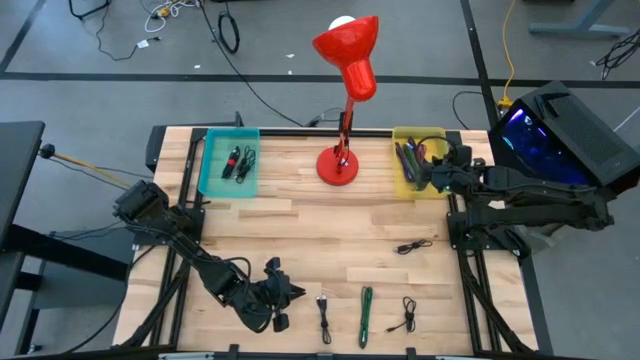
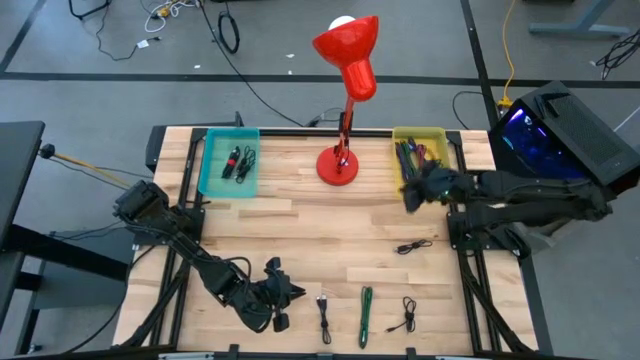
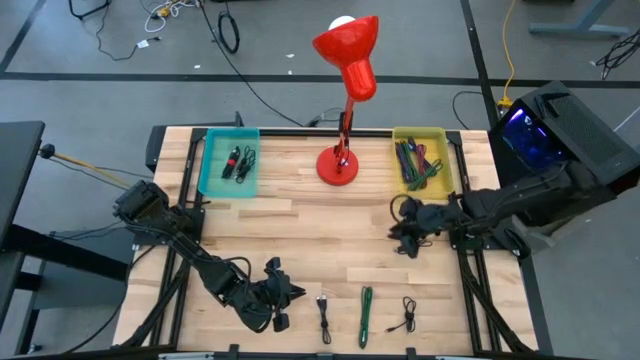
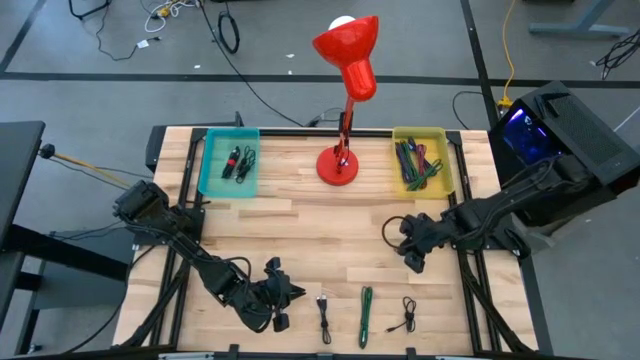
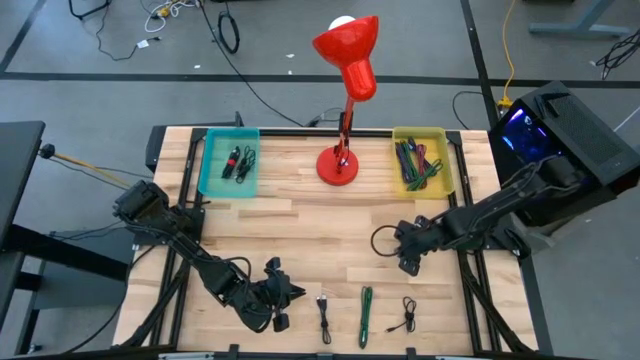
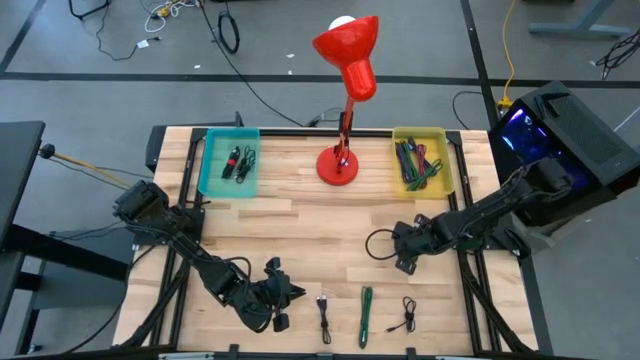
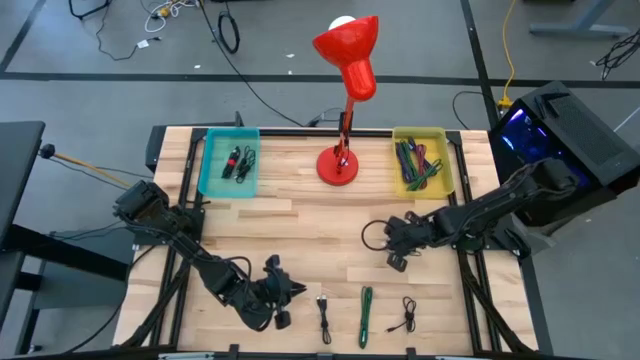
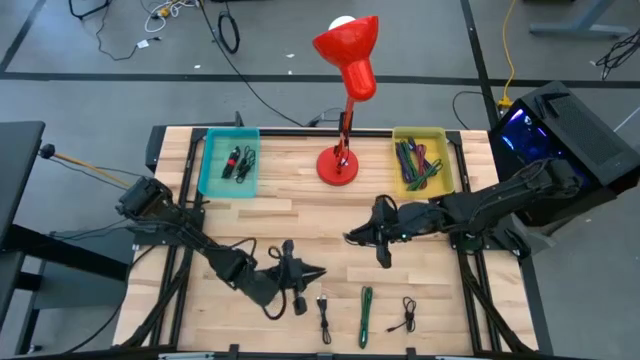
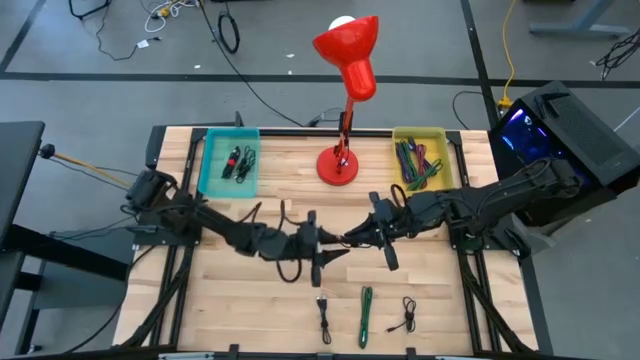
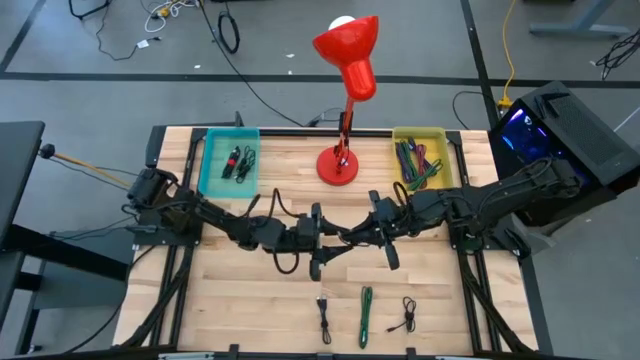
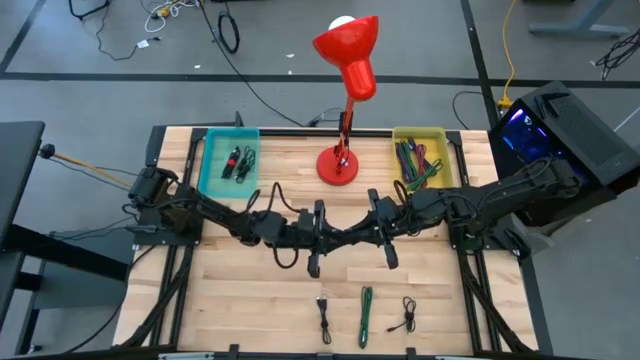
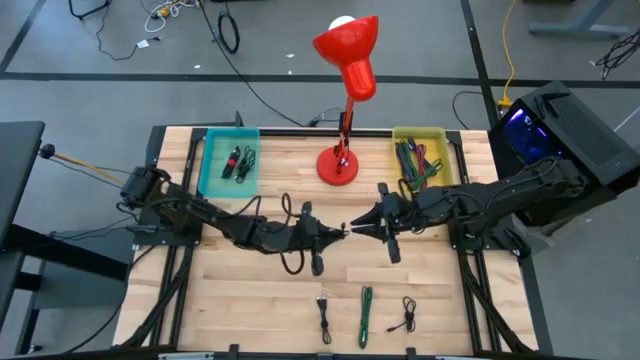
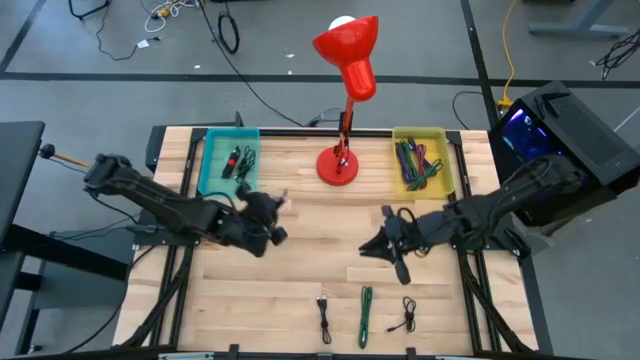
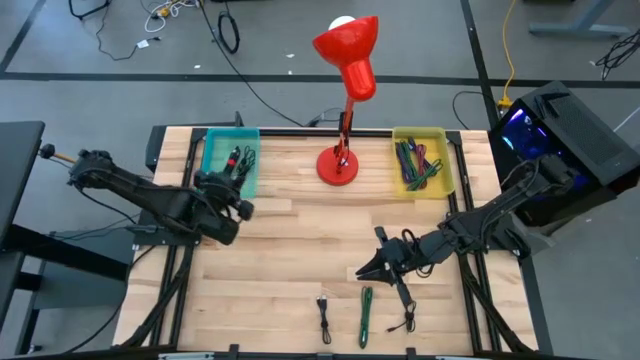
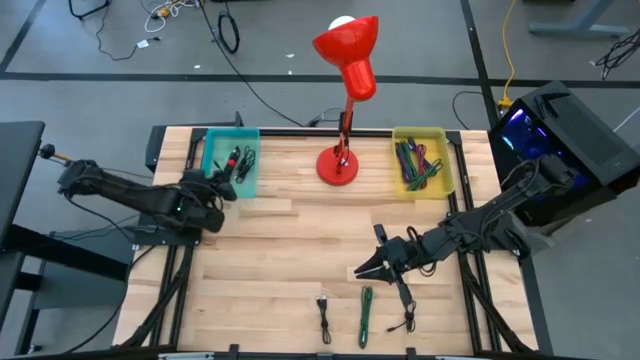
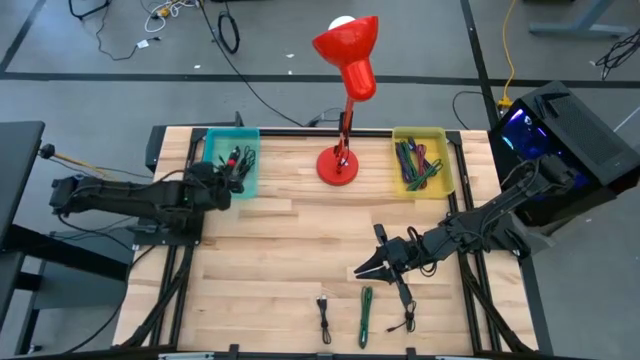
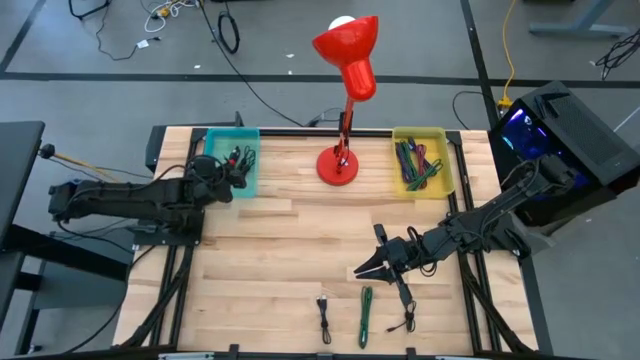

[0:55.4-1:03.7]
Task: Pick & Place USB Port
Put the black USB cable into the green bin

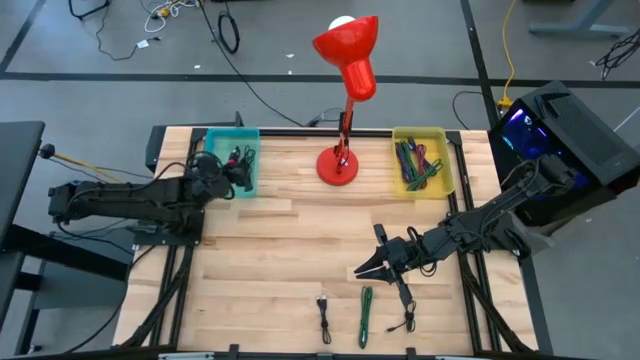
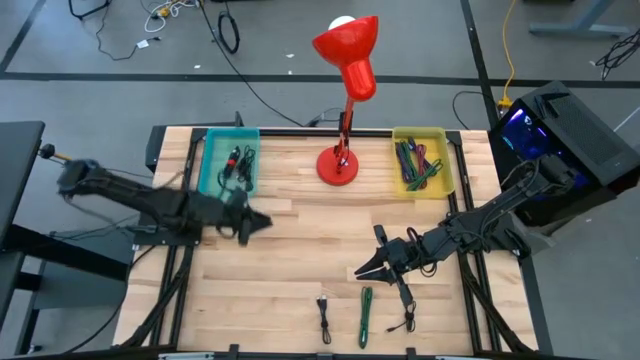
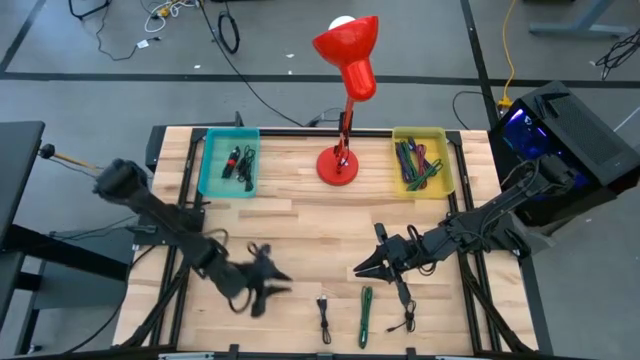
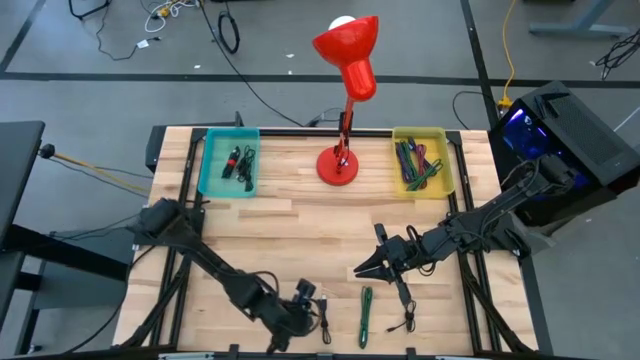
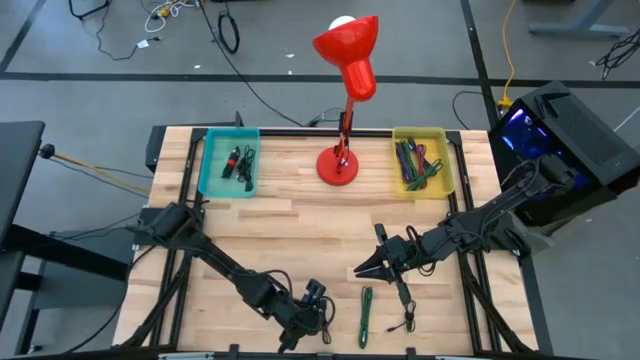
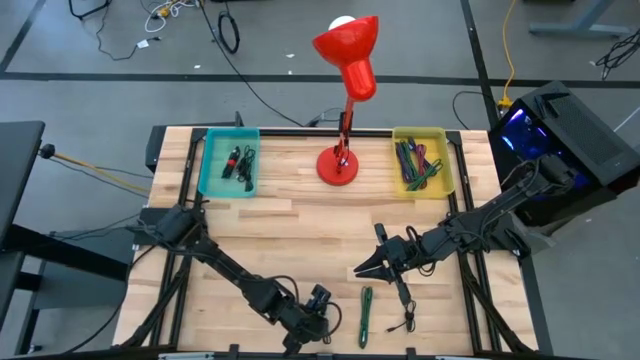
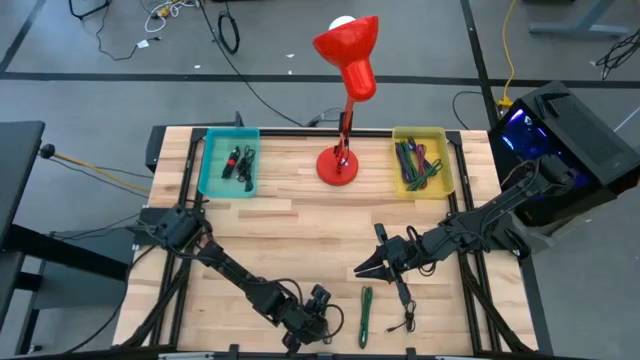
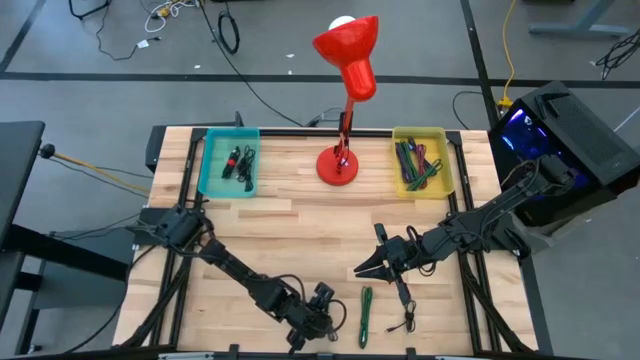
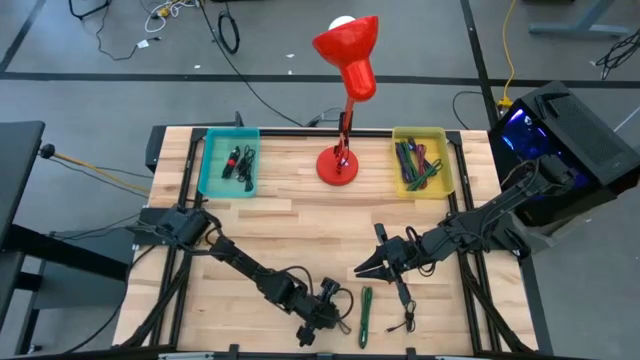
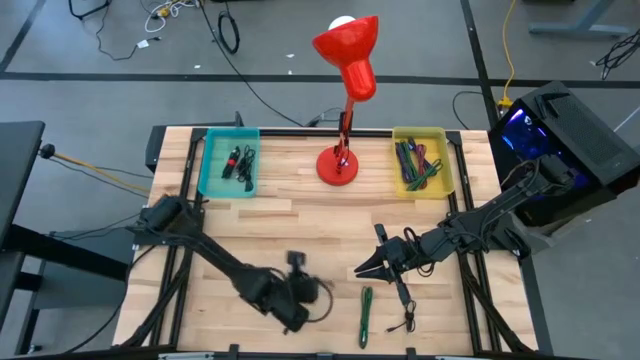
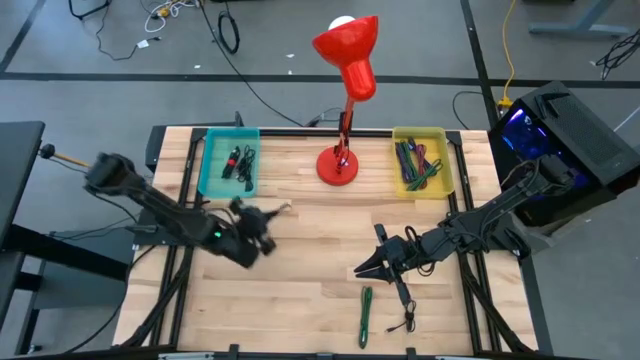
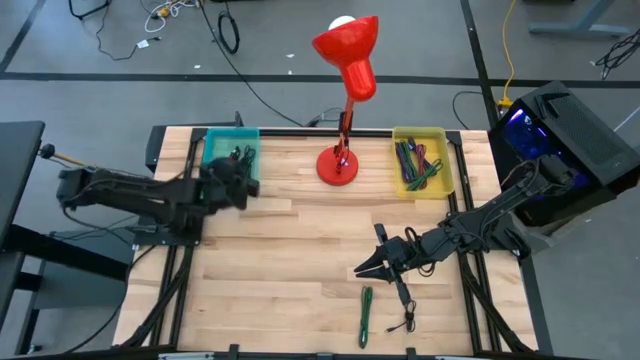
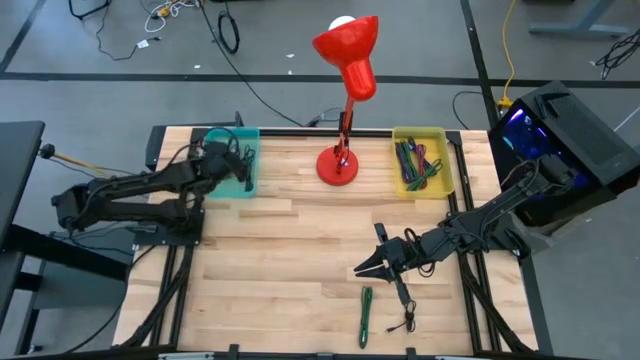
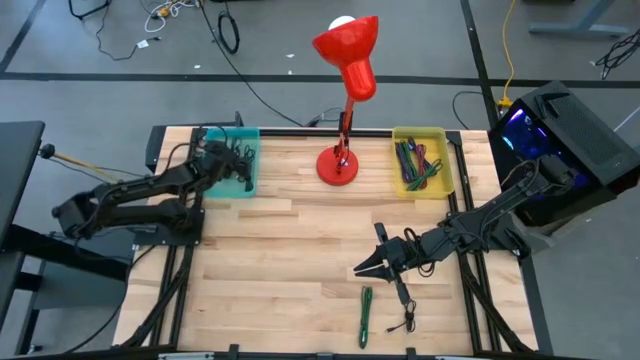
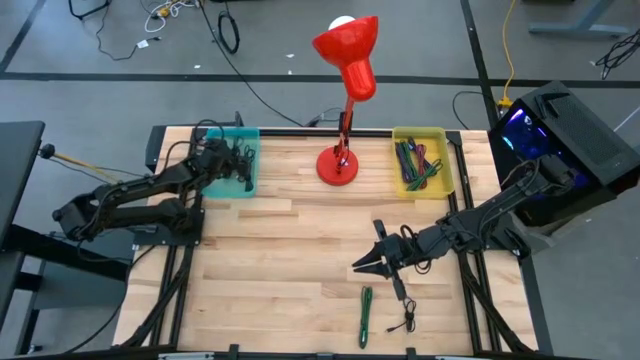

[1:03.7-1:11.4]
Put the black USB cable into the green bin

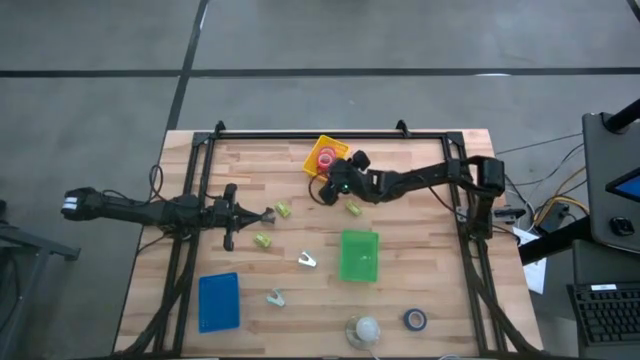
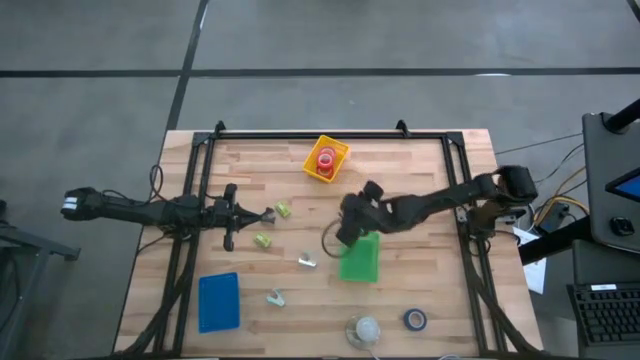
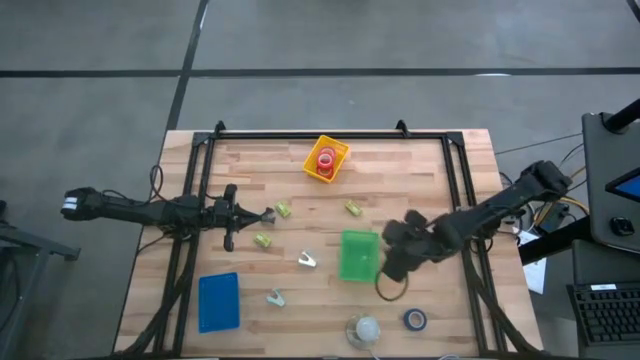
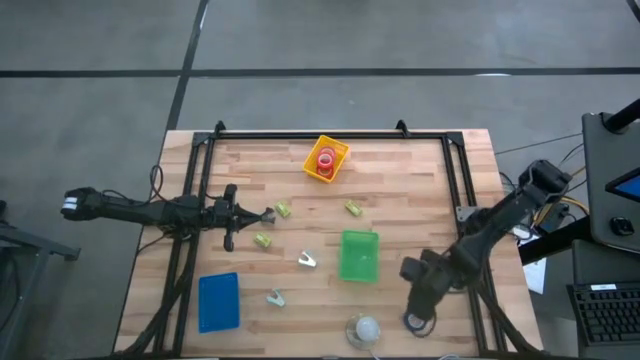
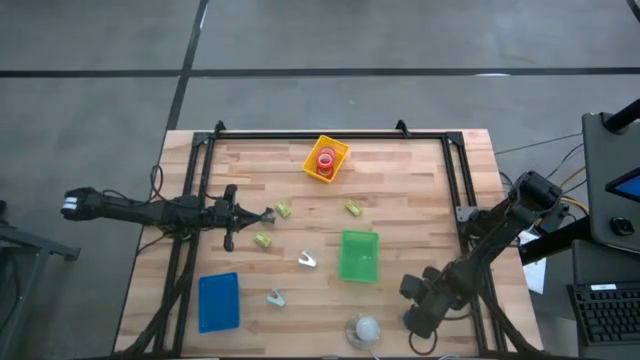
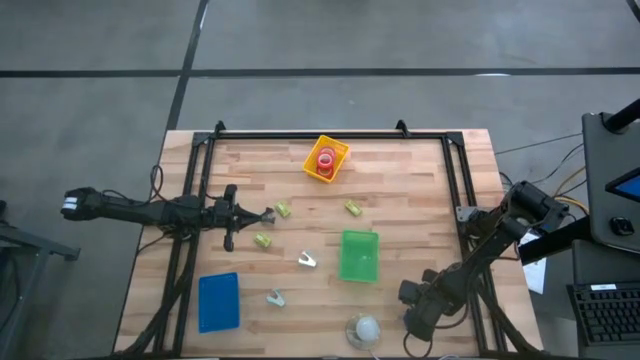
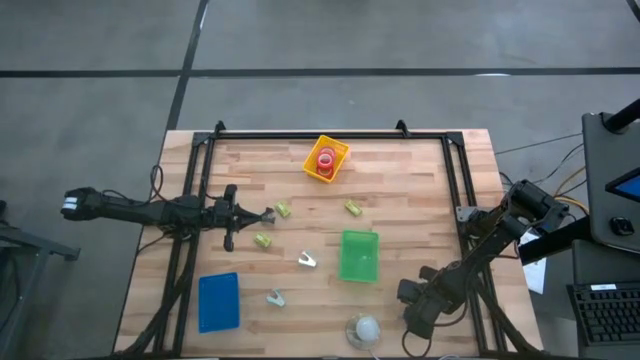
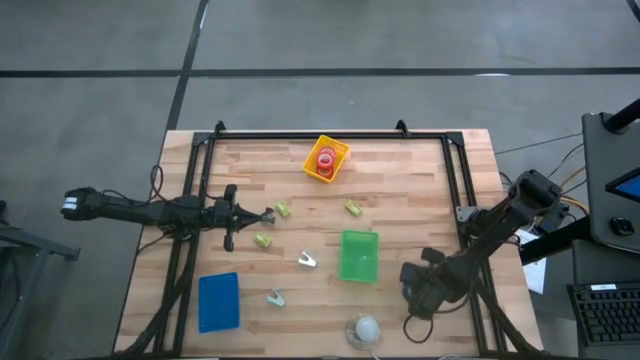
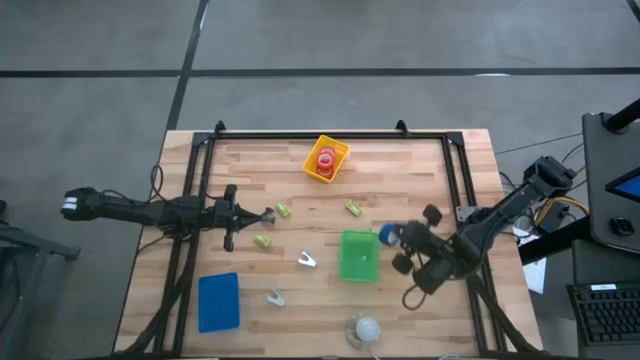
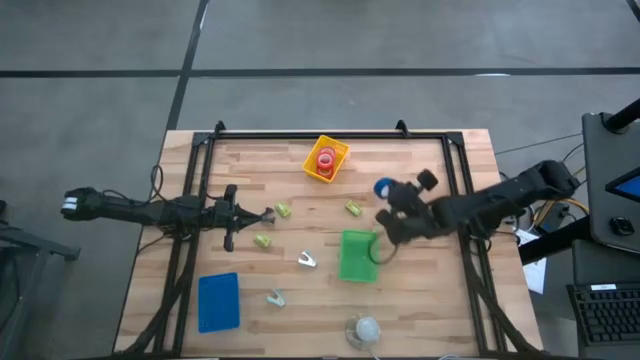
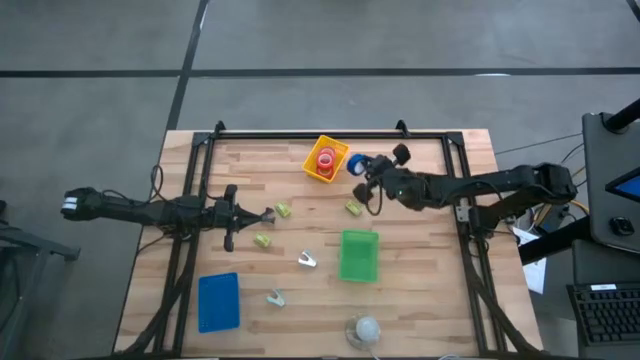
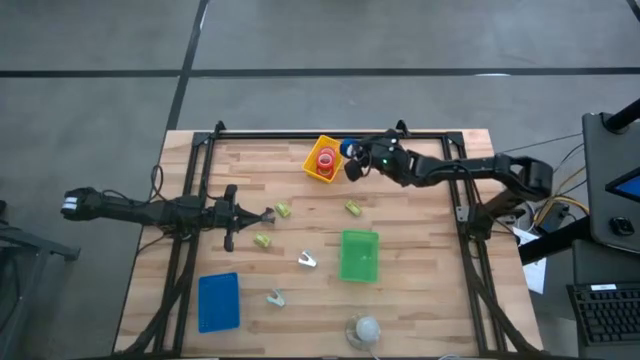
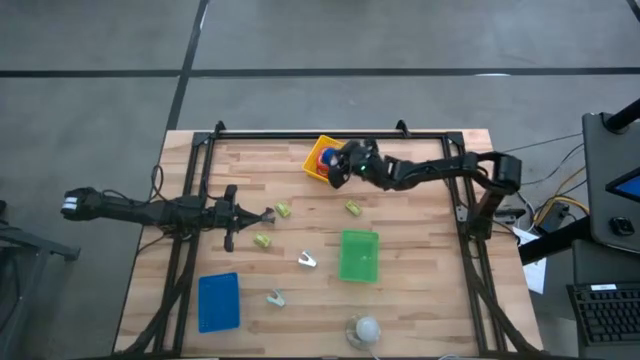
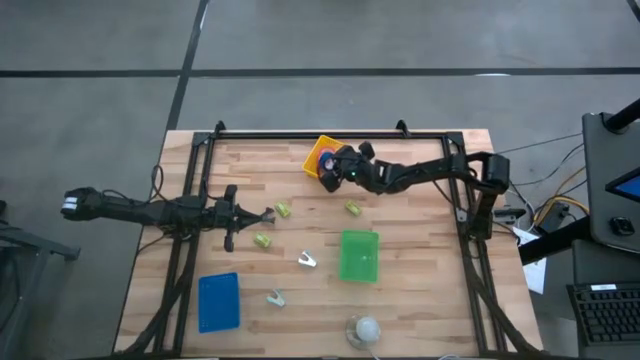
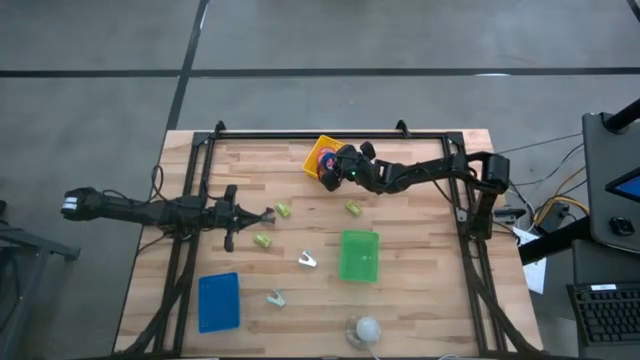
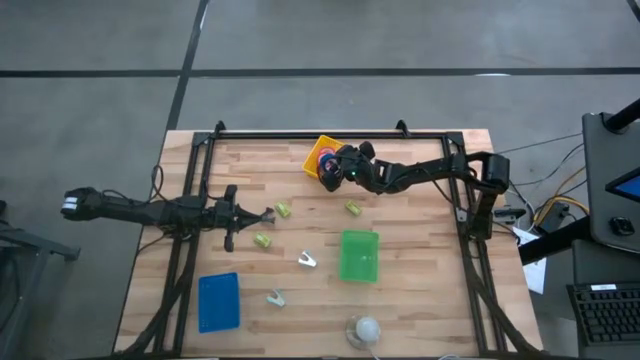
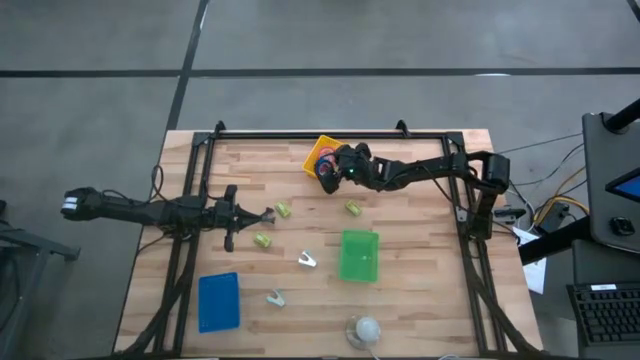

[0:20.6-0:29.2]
Task: Pick and place Stapler, Stapler remover, tape
Put the blue tape into the yellow bin
